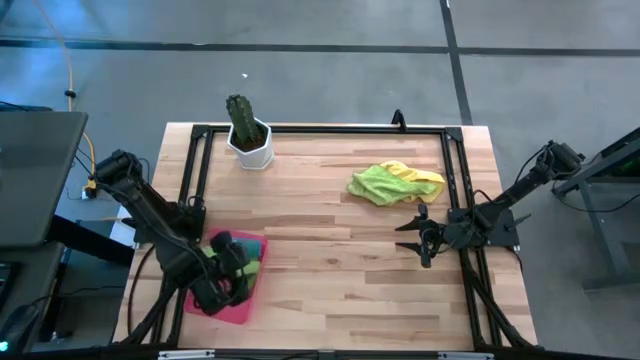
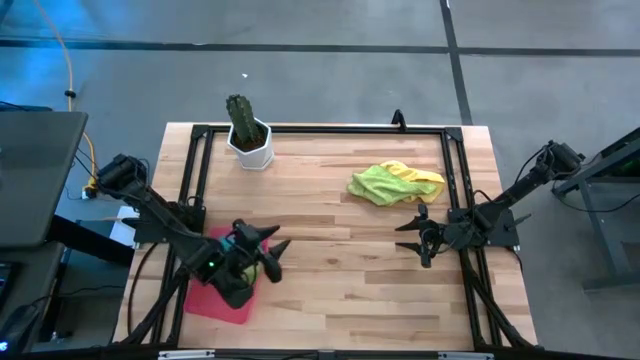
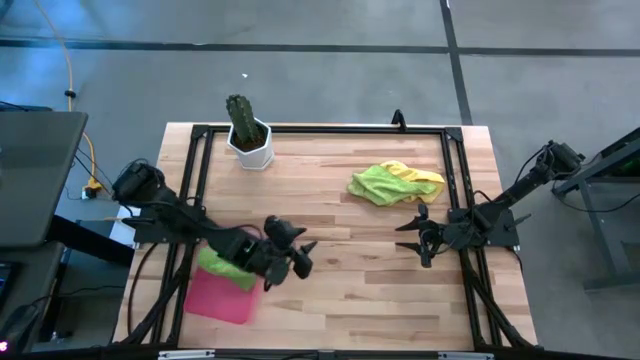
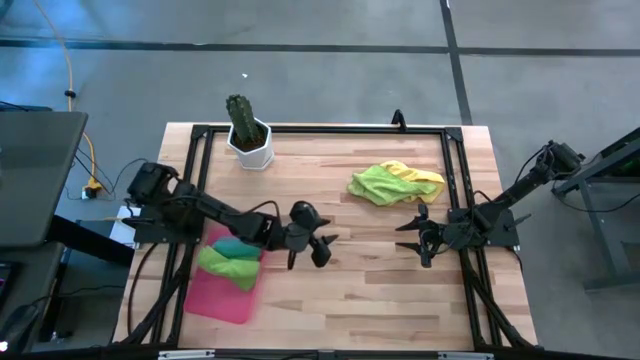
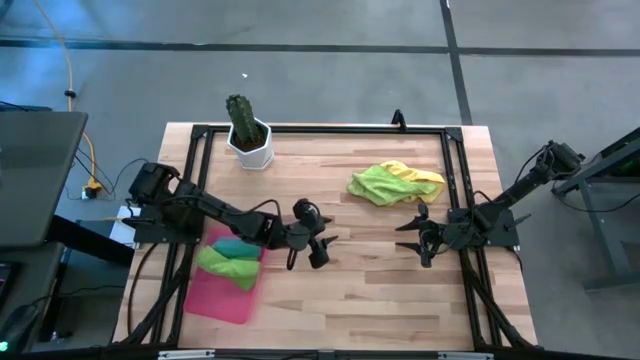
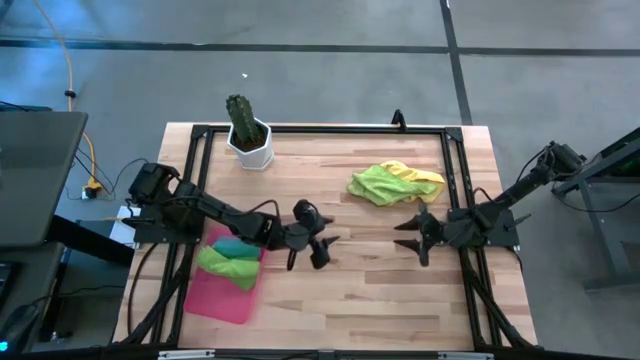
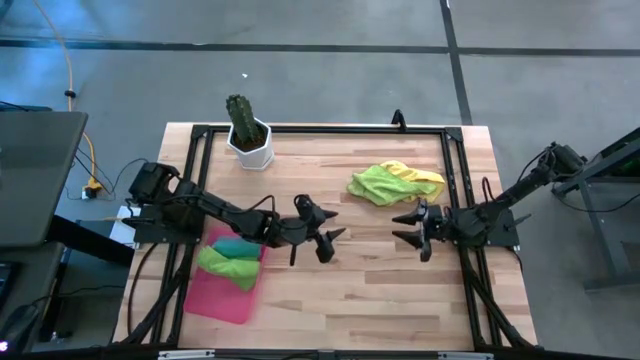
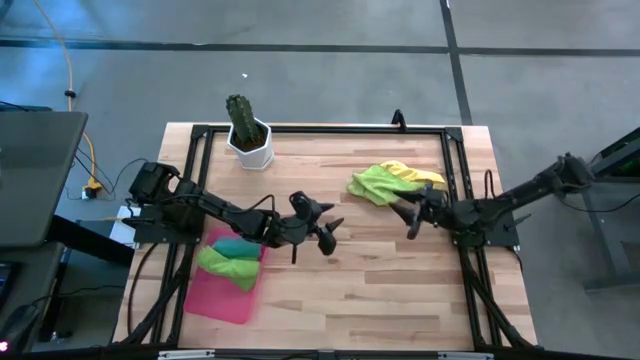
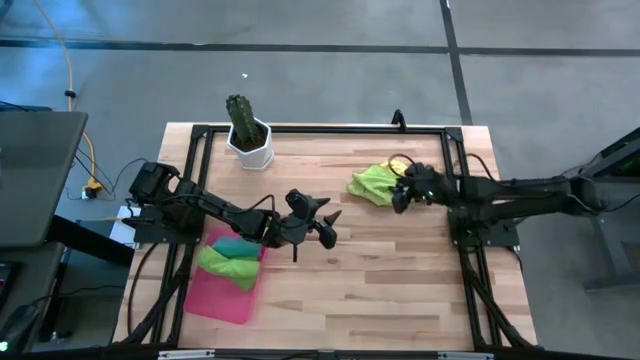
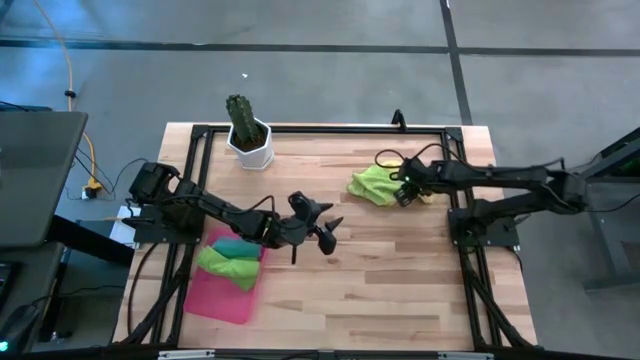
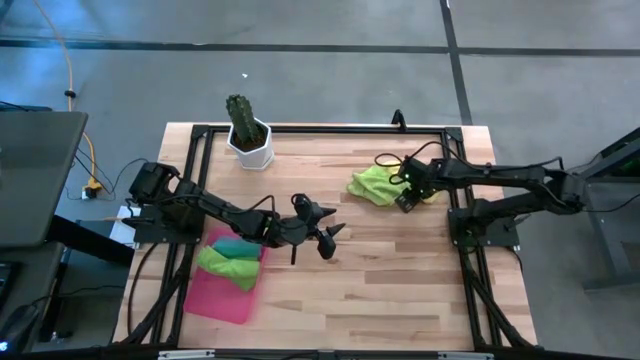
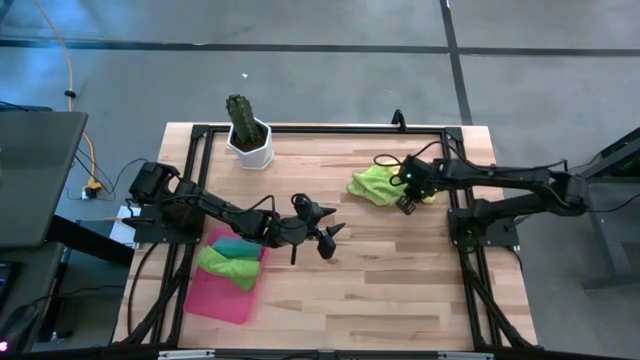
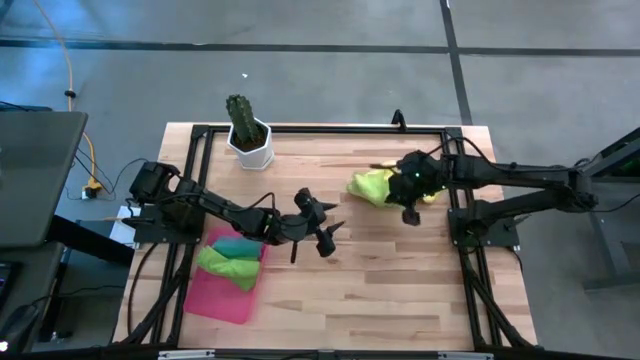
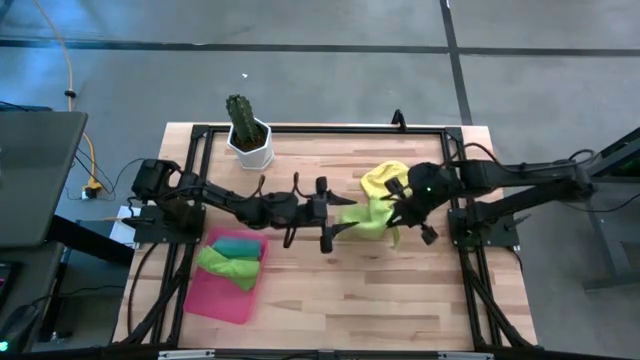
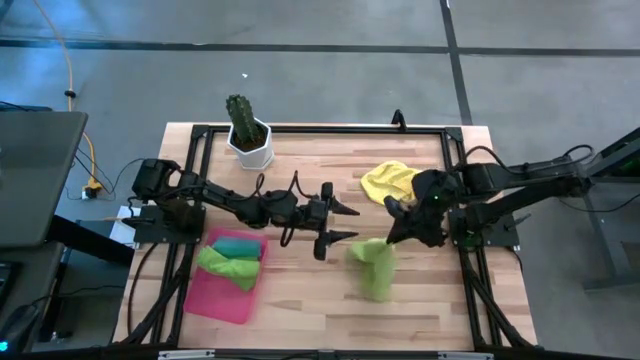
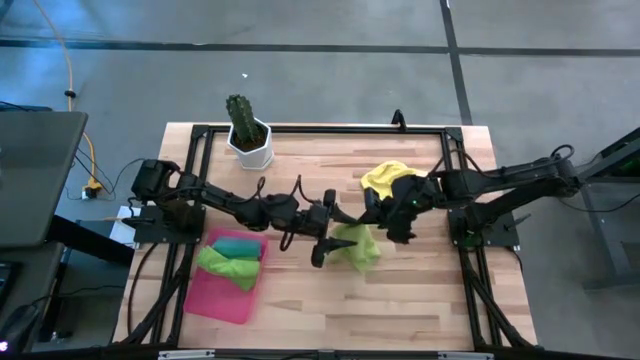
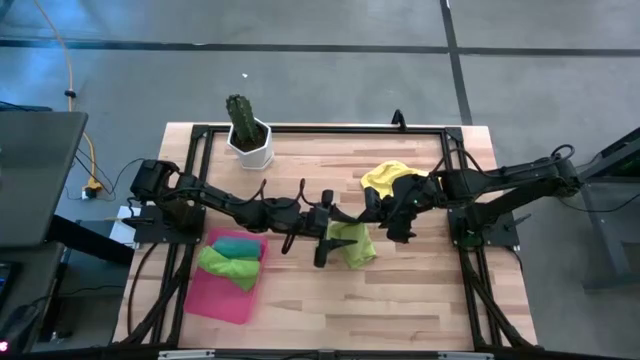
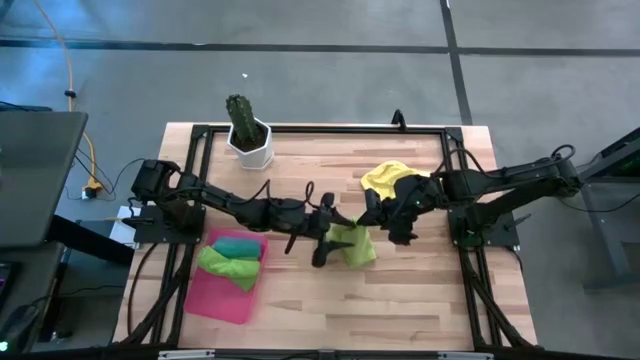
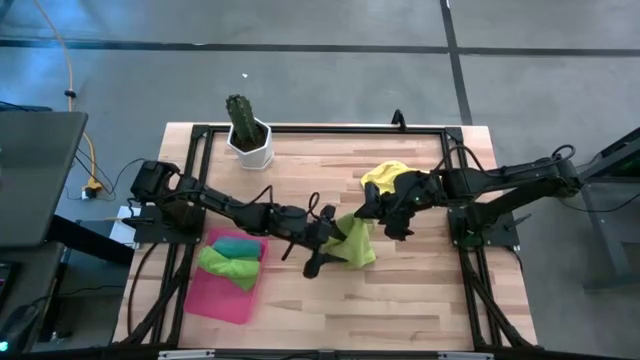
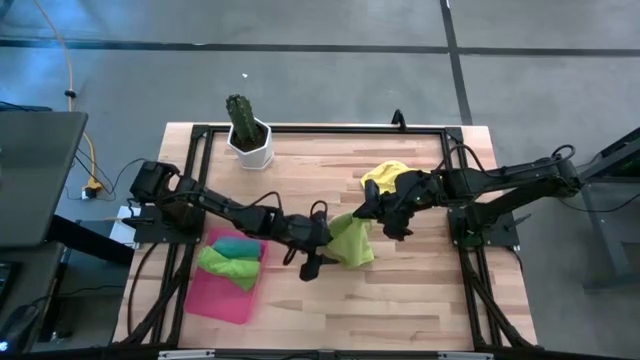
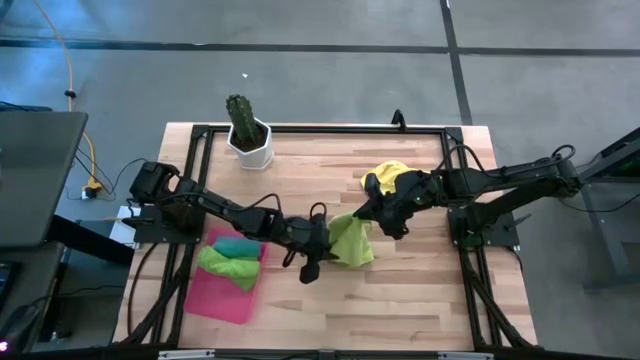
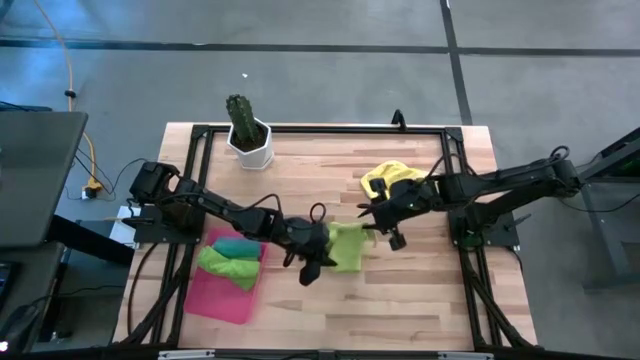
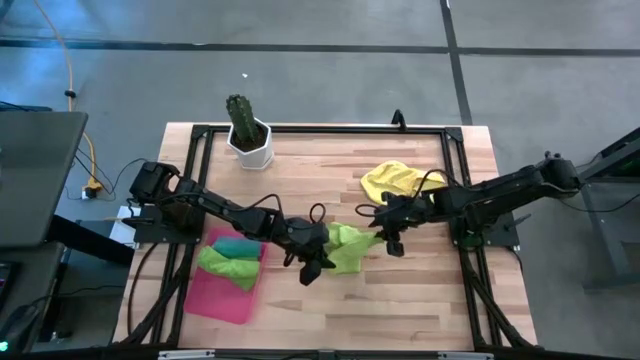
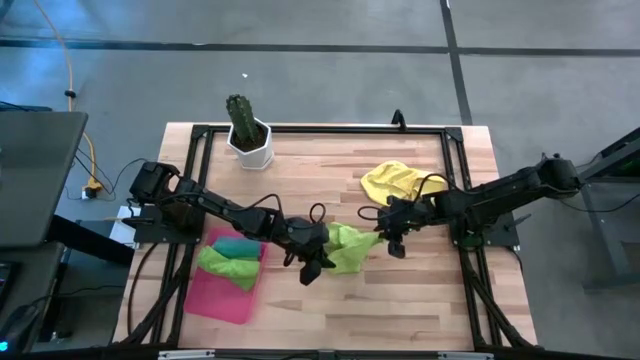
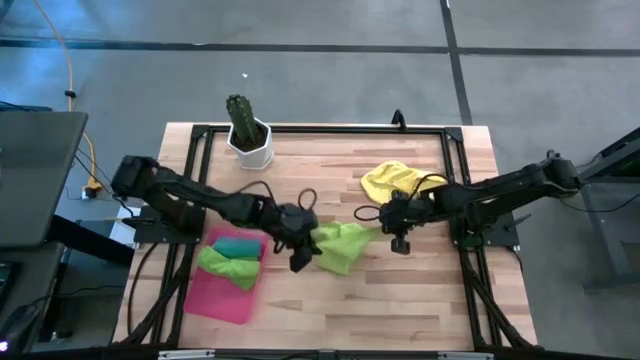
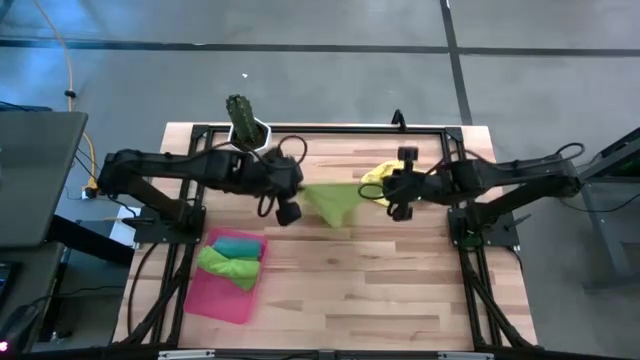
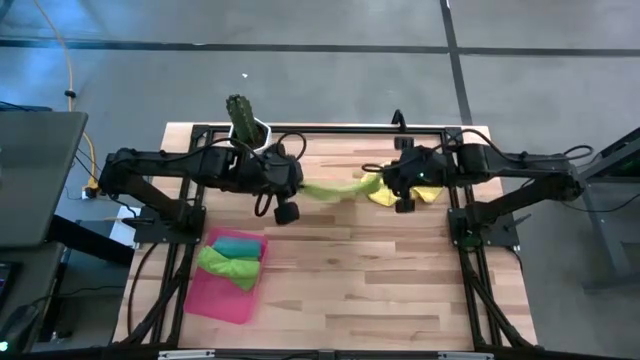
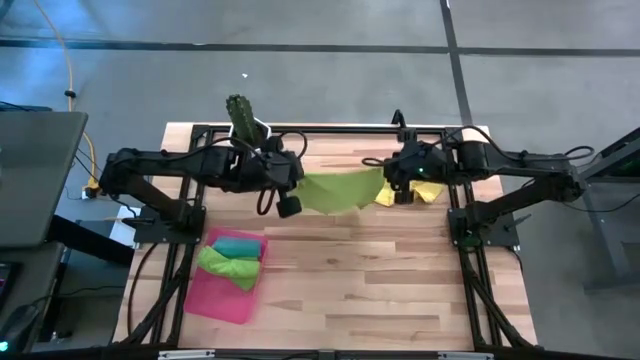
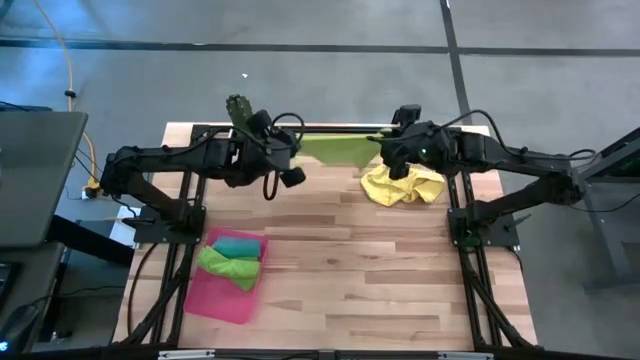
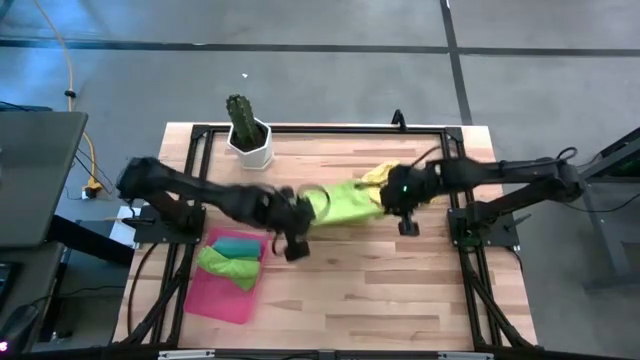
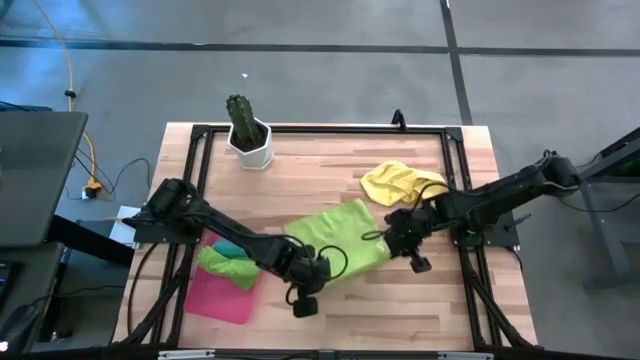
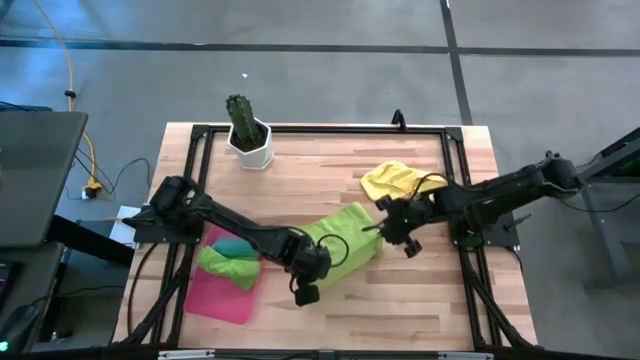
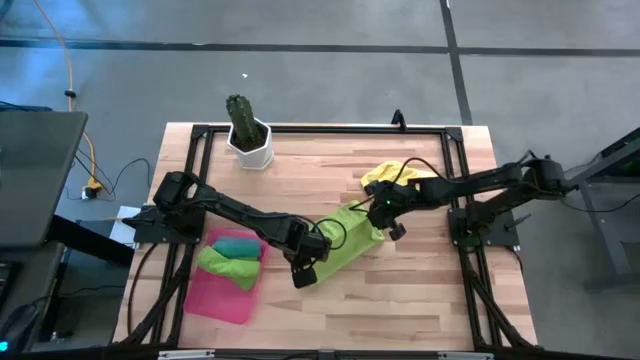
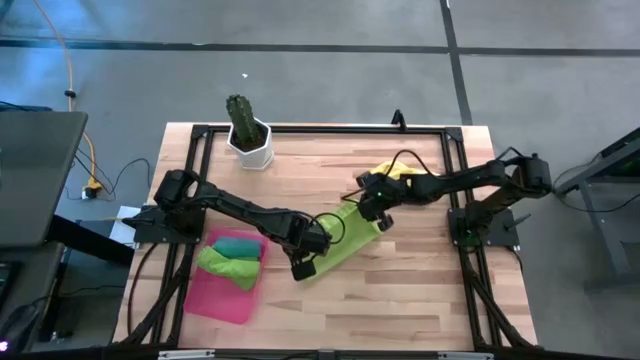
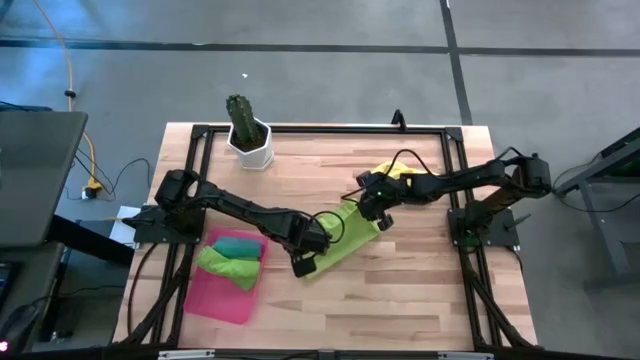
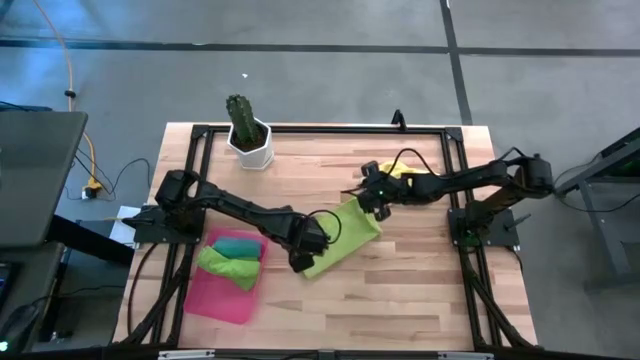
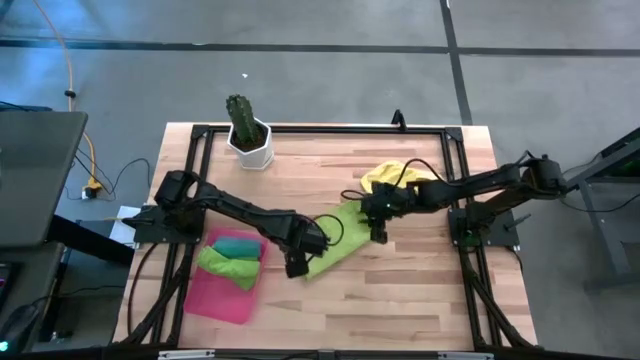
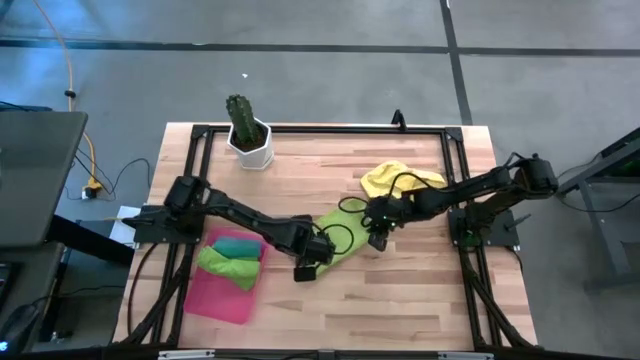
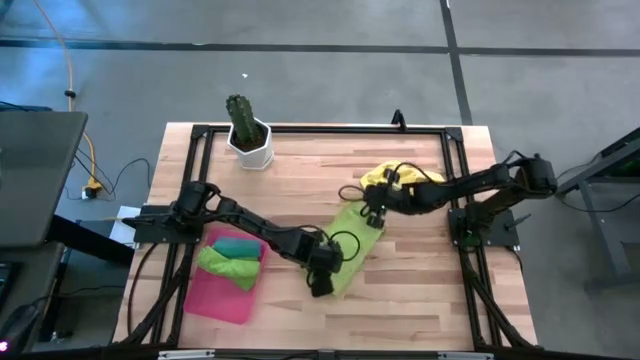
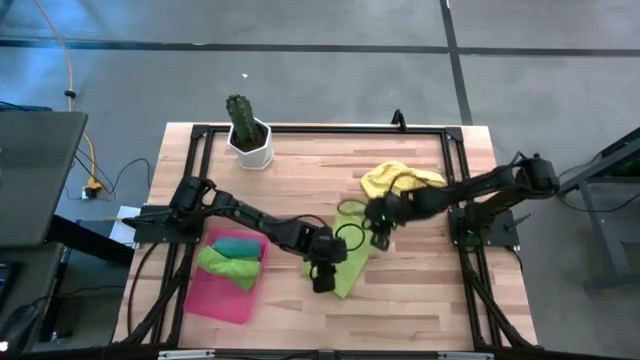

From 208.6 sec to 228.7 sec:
Task: Roll microfiber towels into tight, uniform cylinder then place into a basket
Roll the light green towel
